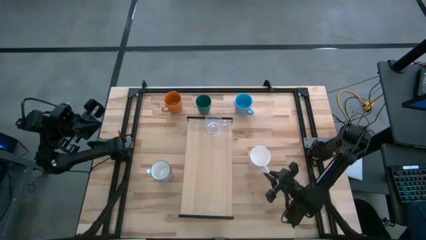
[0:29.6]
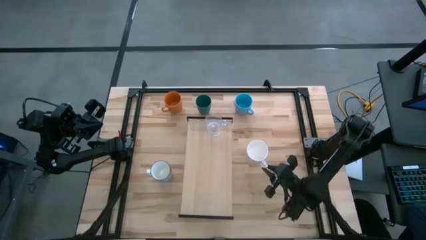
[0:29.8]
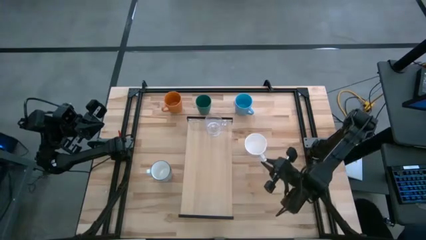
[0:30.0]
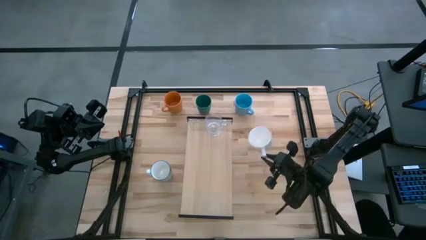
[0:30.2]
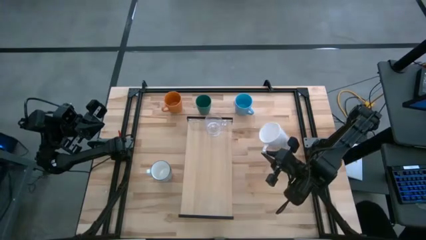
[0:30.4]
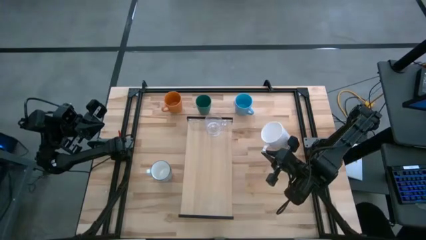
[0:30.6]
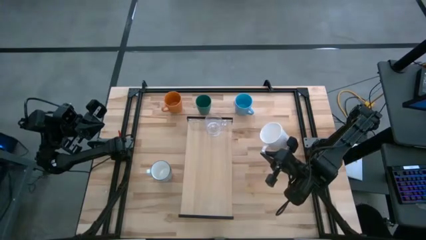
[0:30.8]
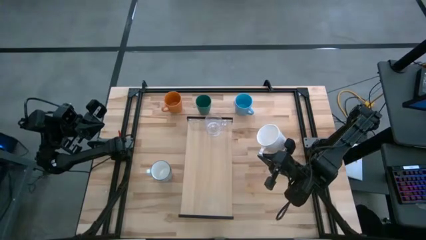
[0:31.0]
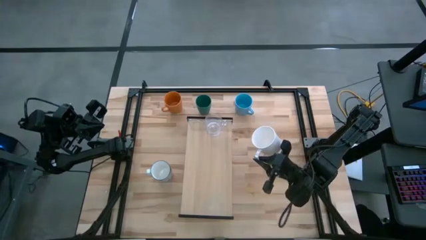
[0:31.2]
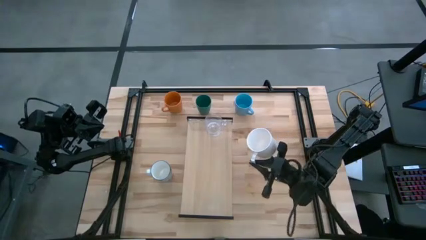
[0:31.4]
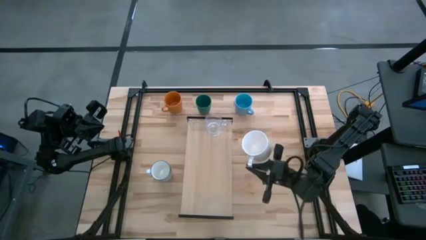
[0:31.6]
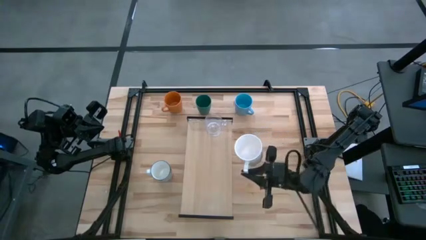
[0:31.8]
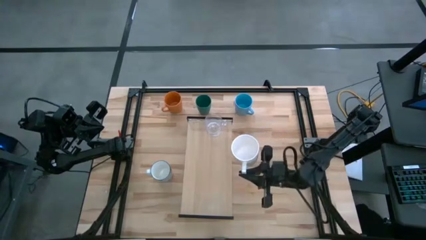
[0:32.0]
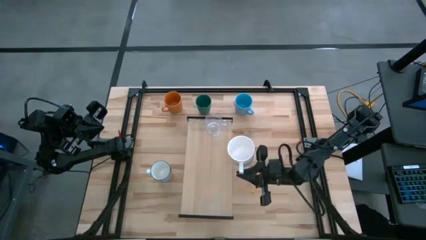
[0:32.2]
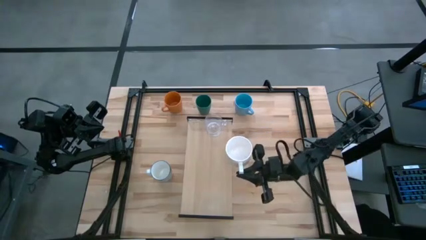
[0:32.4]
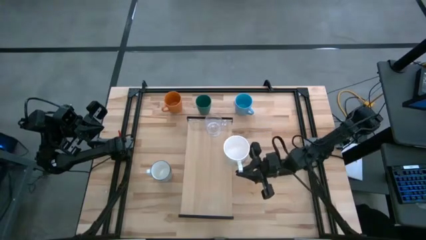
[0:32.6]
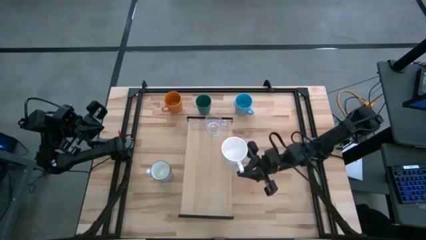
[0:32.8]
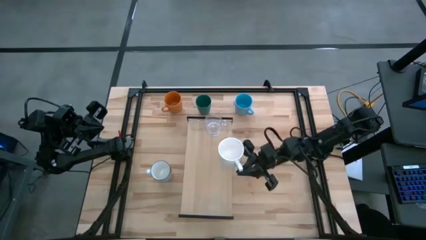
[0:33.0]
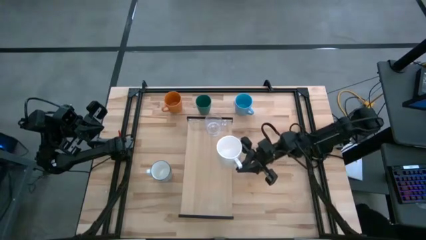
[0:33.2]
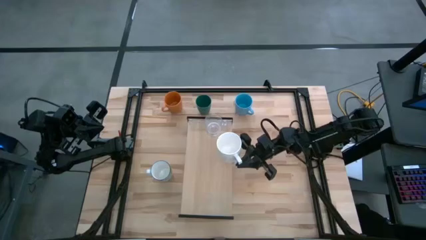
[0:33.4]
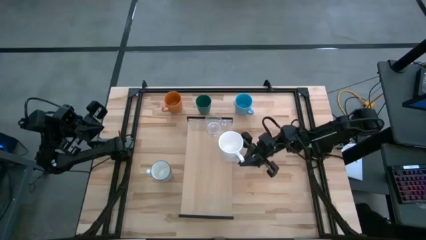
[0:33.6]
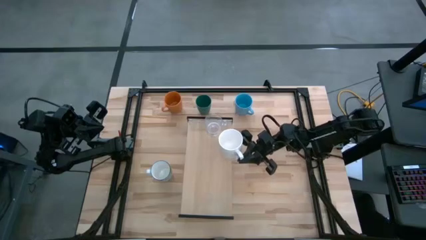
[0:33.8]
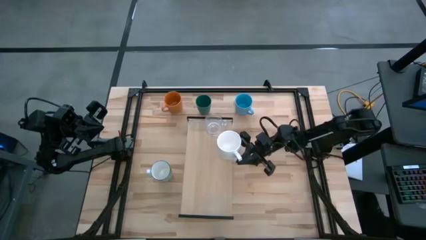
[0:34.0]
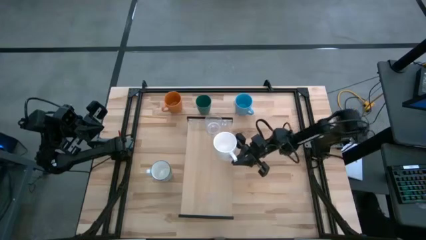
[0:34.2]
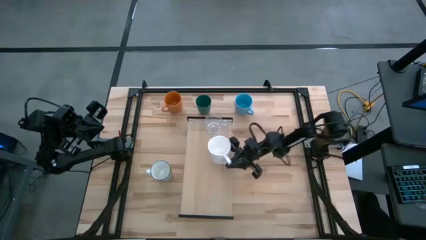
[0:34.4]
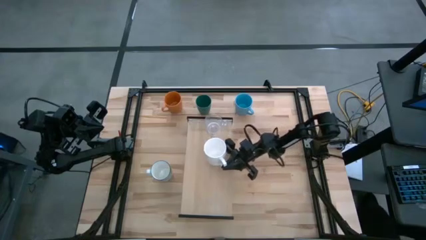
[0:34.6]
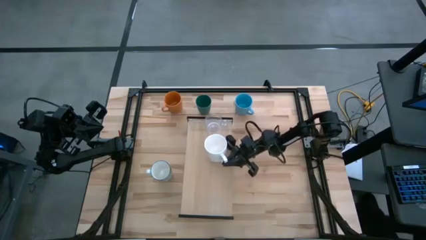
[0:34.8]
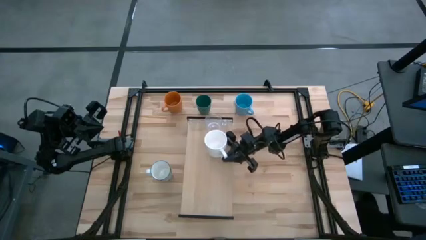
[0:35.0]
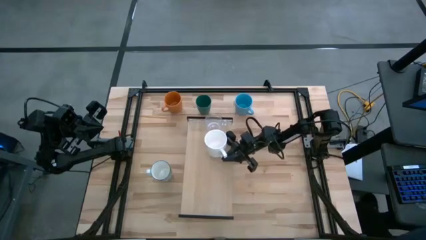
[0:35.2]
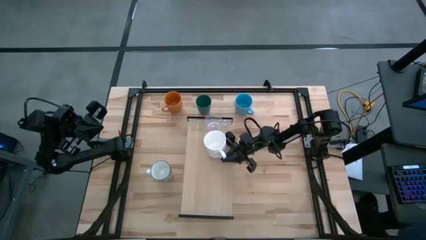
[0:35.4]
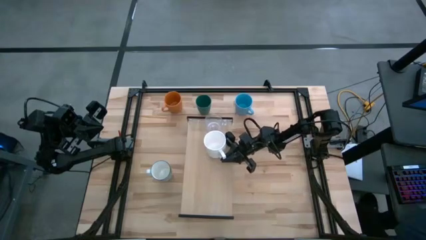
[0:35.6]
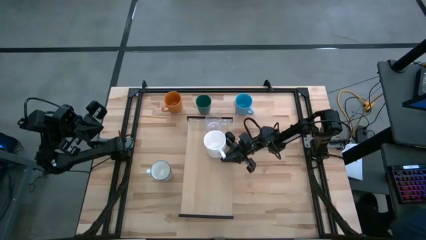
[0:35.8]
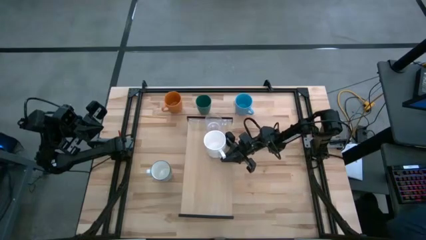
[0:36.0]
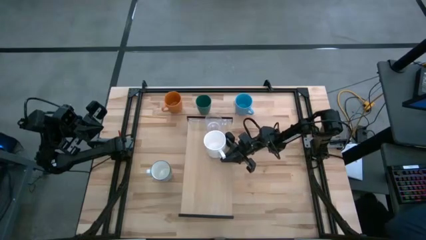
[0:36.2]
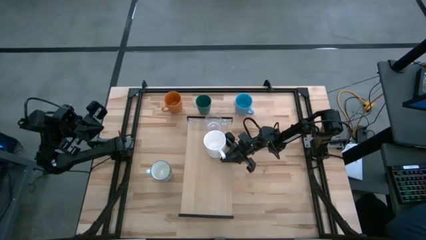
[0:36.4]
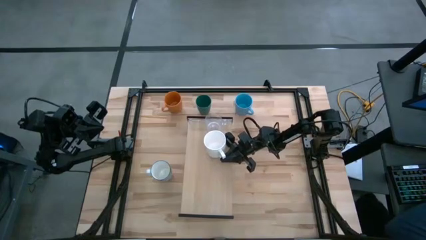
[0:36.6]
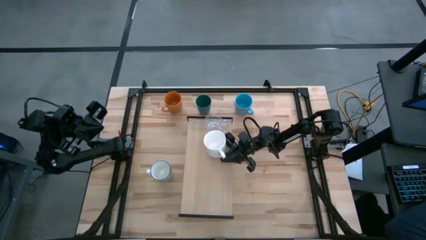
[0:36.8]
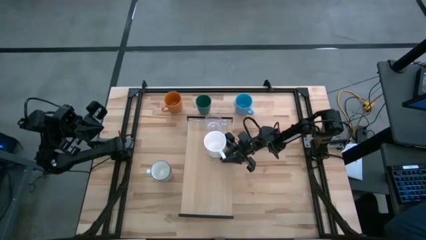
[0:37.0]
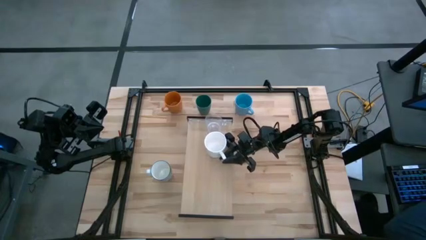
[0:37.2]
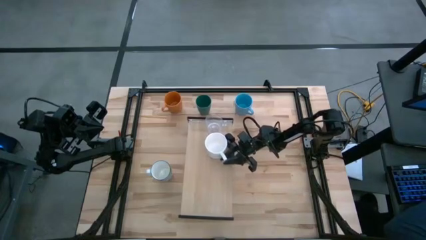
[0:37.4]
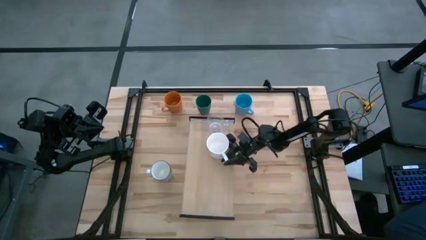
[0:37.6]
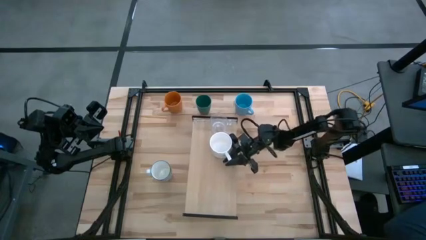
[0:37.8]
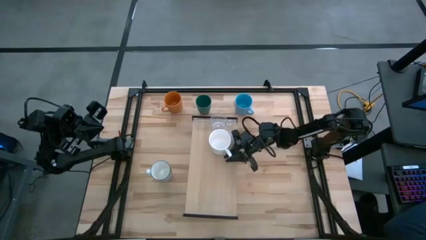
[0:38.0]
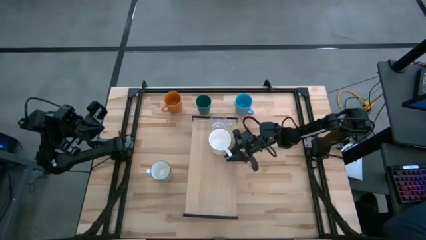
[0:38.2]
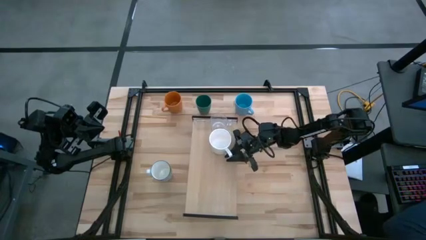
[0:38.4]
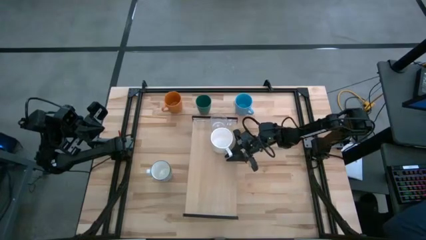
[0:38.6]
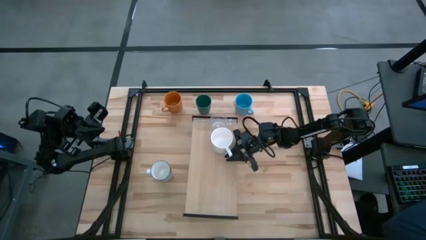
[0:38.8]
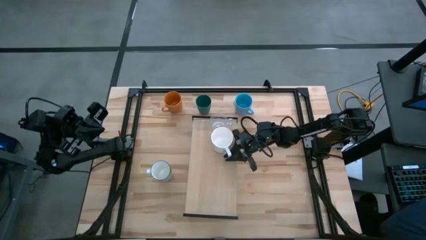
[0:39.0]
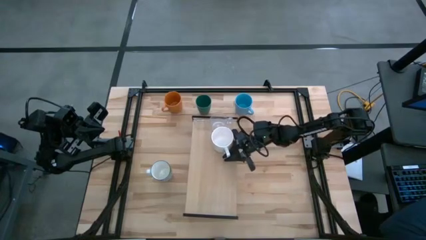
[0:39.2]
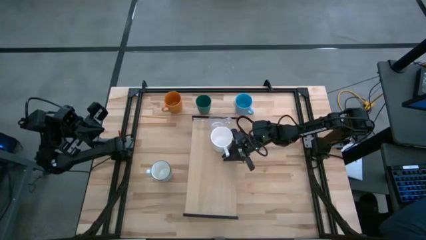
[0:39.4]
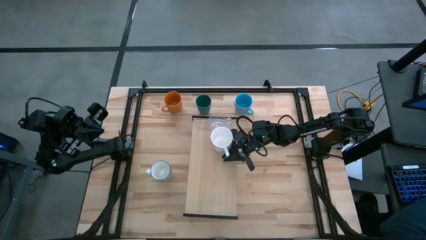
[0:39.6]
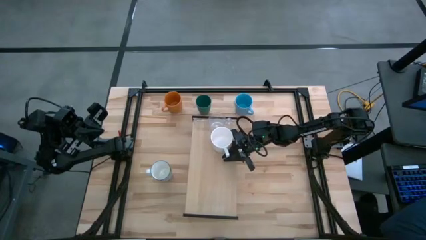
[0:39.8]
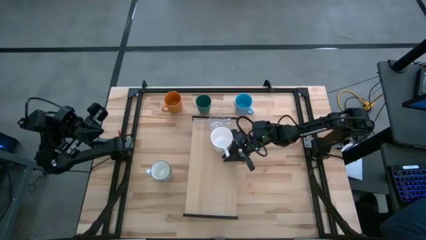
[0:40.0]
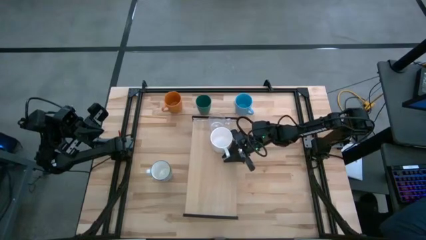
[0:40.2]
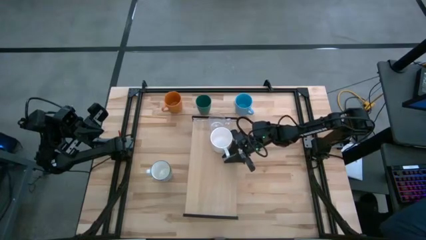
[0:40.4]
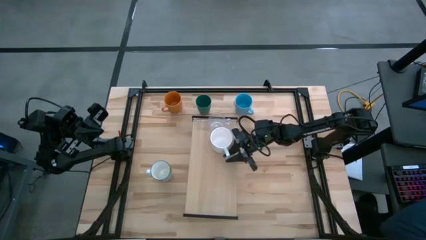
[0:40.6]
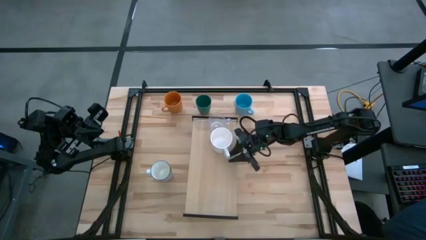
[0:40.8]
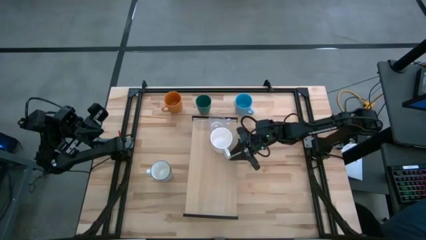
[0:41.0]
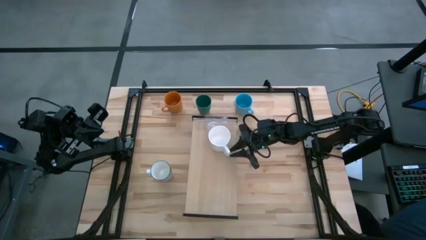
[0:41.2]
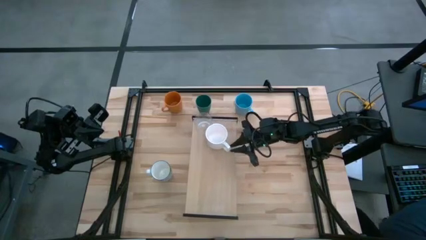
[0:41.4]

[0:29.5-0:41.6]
Task: Stack small to large cups/mugs on shelf
Put the white mug on the shelf
